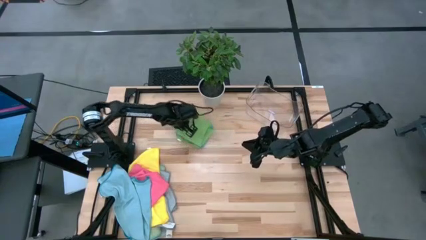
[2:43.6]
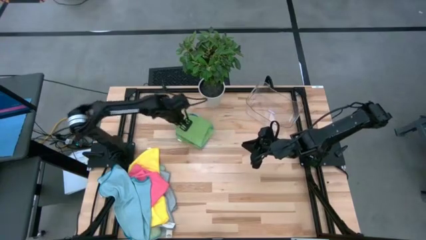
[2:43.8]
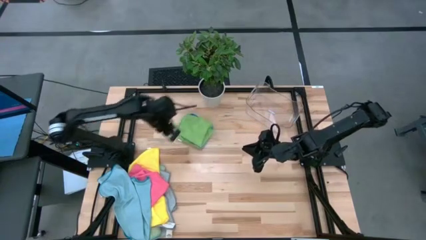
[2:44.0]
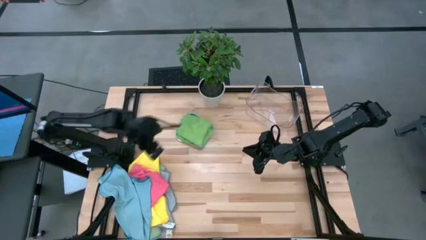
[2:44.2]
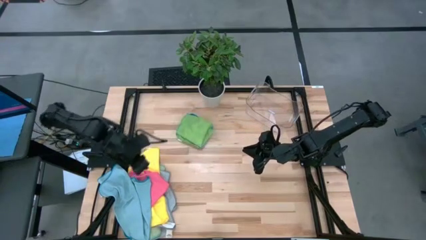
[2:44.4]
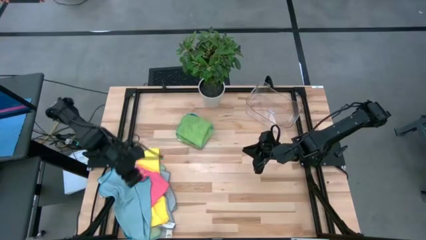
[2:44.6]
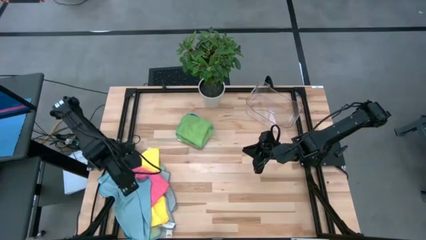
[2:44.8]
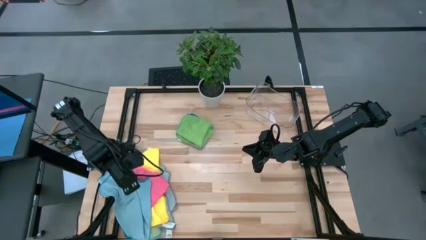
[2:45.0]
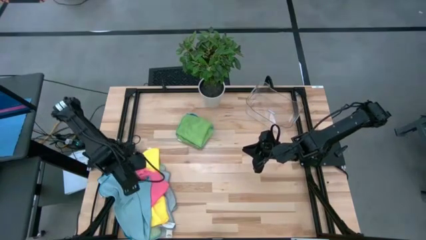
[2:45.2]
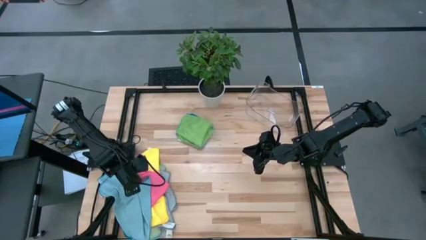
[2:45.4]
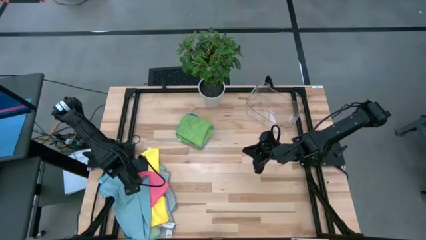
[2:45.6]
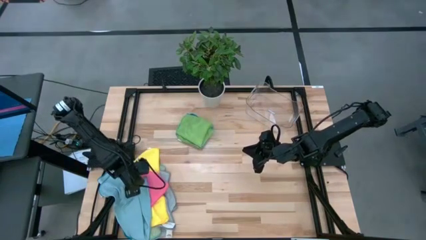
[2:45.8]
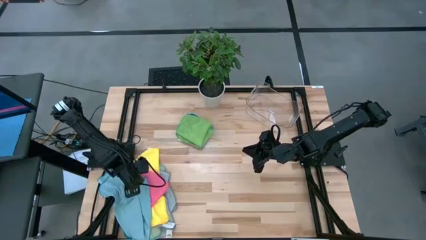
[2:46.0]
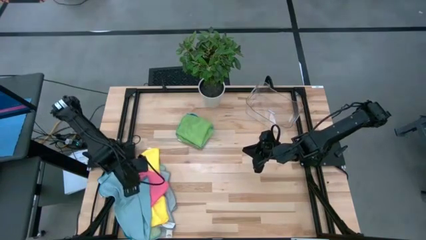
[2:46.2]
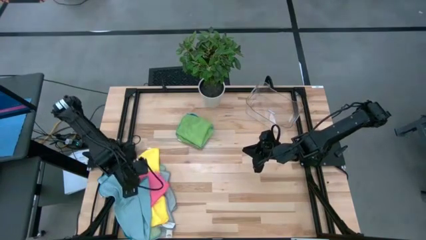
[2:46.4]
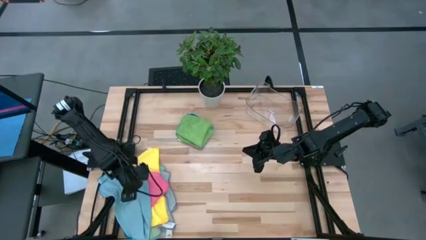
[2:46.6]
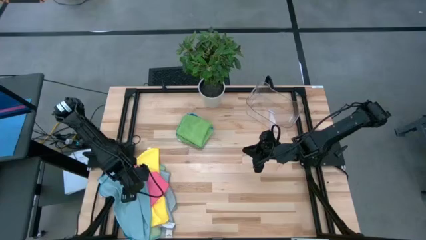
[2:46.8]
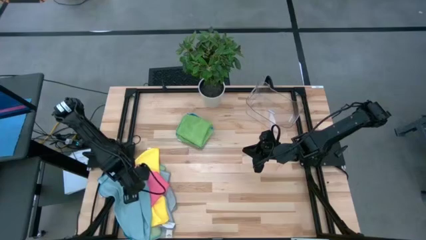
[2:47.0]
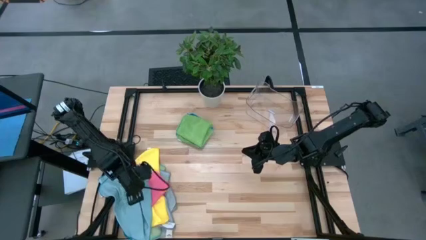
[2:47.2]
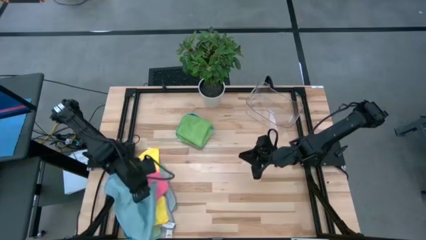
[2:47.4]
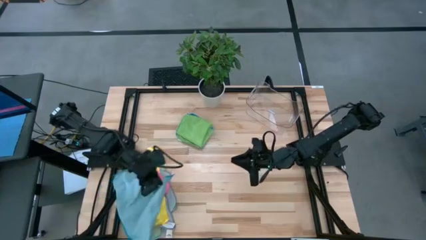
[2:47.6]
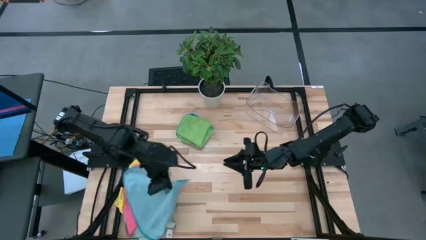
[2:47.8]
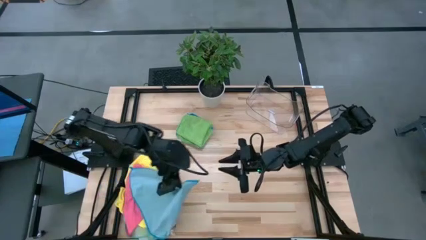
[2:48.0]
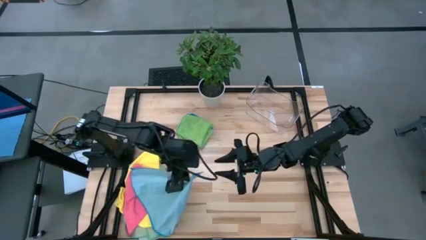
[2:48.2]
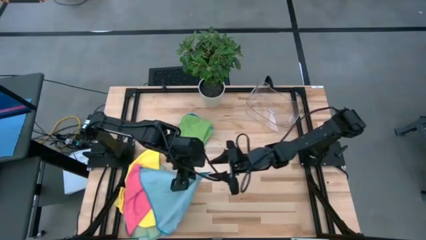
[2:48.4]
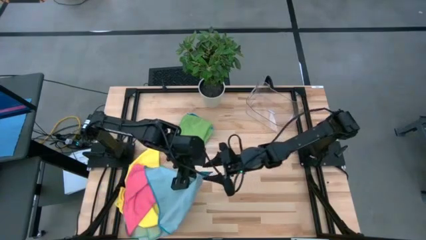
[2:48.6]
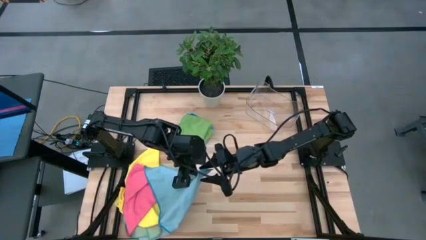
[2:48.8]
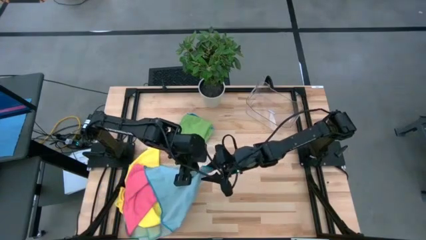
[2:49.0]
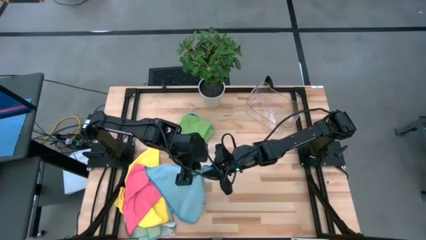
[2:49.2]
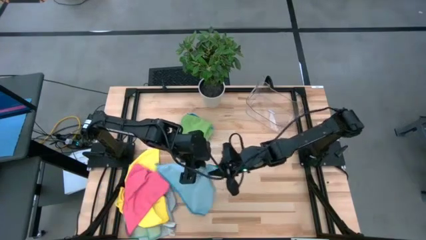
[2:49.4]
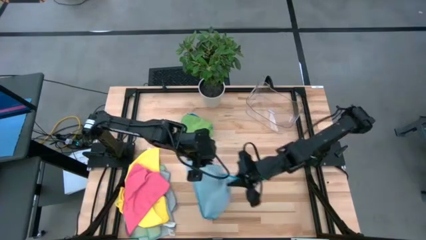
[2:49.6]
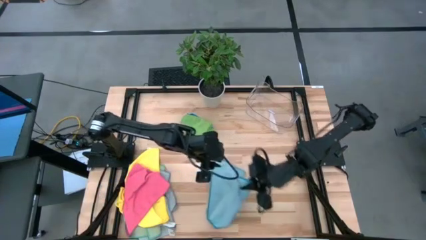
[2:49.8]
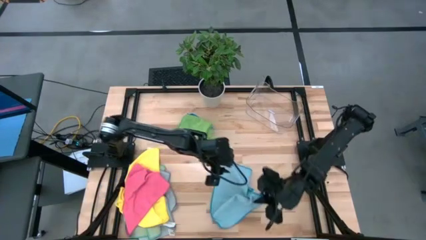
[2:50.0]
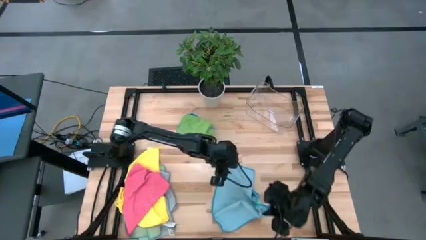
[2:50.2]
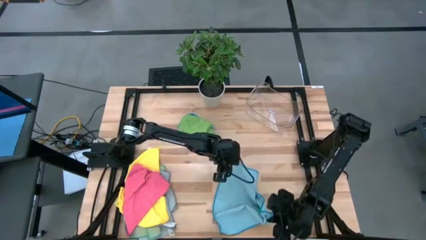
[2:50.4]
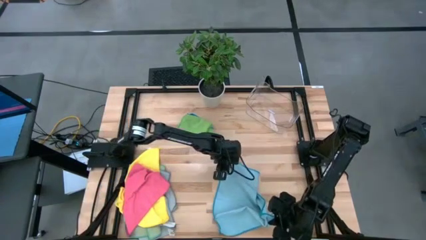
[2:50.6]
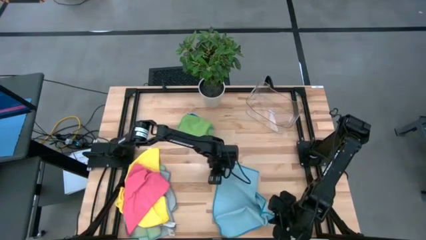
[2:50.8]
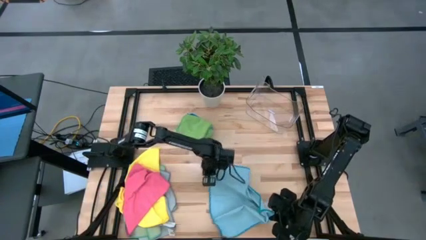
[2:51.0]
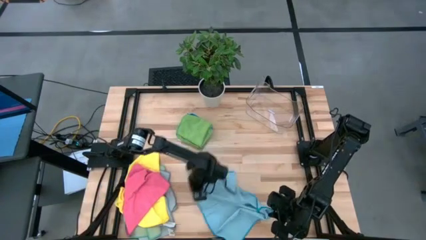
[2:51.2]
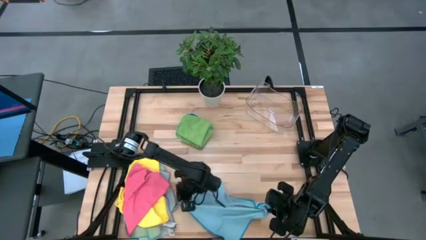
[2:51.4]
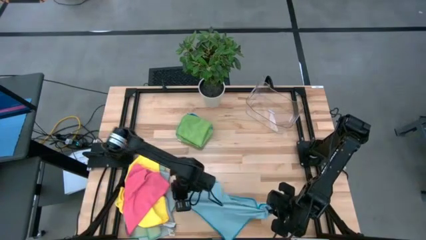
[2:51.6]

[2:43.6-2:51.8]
Task: Fold microfiber towels
Fold the light blue microfiber towel

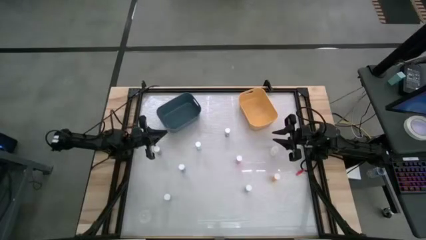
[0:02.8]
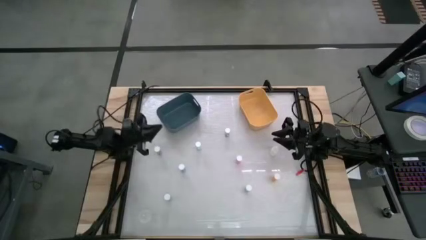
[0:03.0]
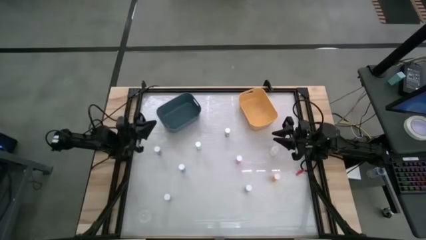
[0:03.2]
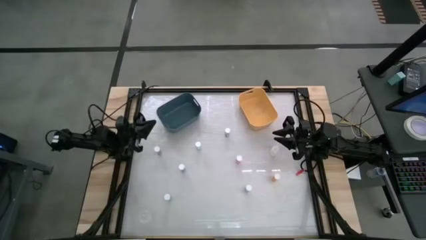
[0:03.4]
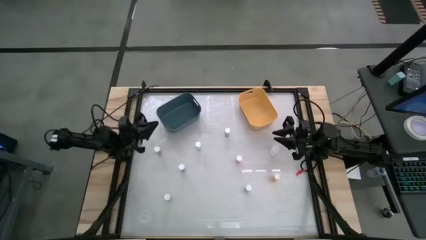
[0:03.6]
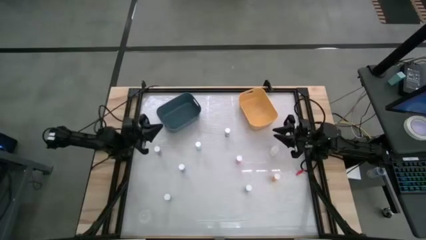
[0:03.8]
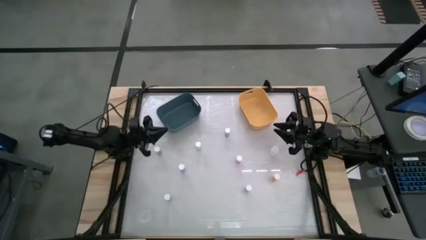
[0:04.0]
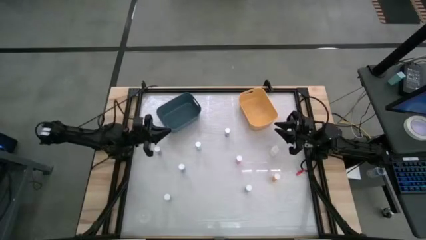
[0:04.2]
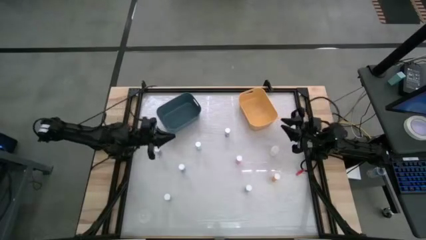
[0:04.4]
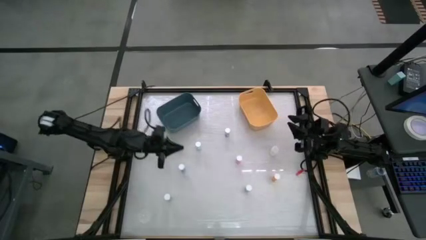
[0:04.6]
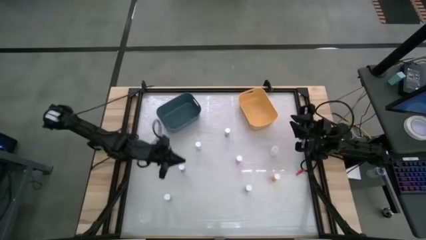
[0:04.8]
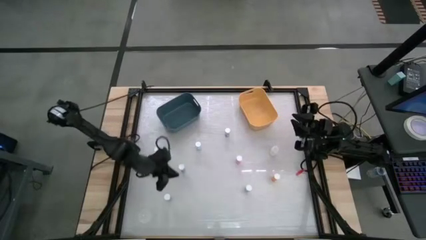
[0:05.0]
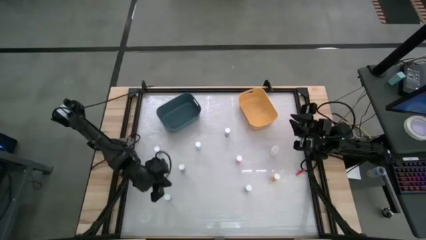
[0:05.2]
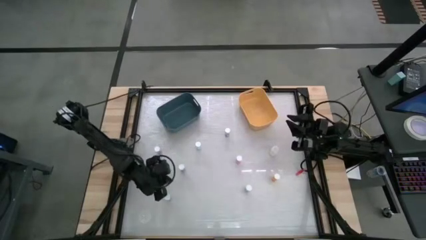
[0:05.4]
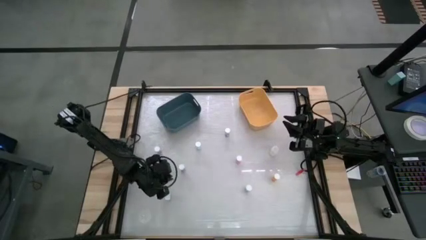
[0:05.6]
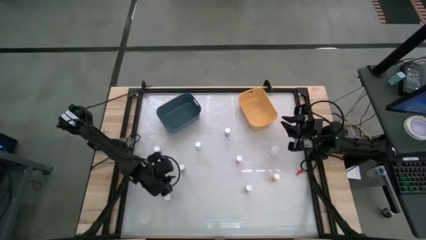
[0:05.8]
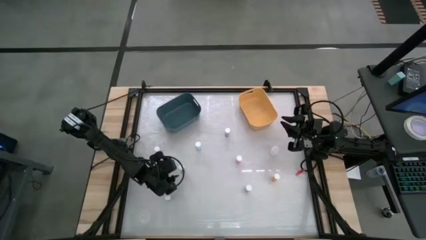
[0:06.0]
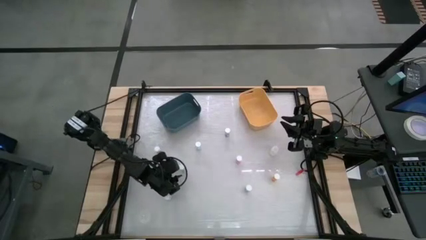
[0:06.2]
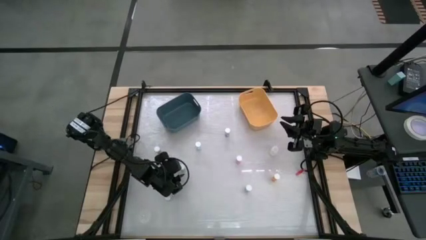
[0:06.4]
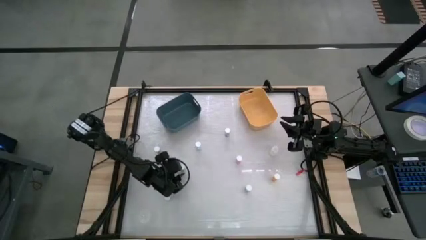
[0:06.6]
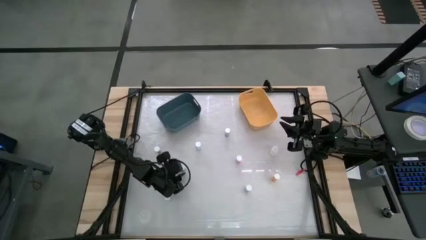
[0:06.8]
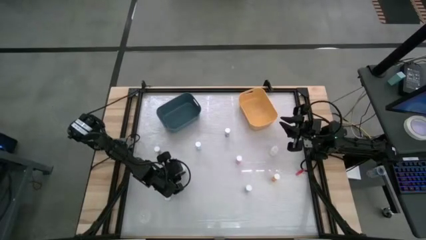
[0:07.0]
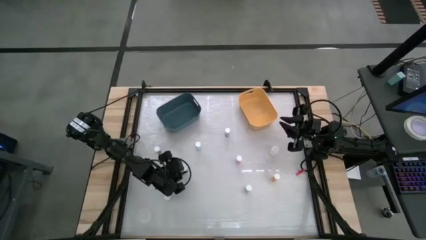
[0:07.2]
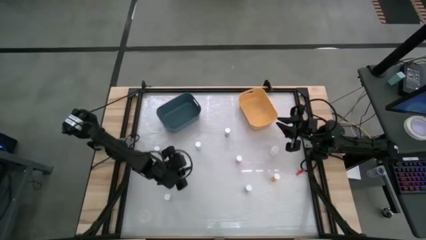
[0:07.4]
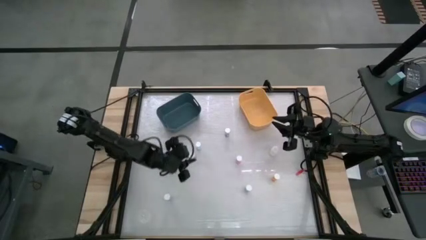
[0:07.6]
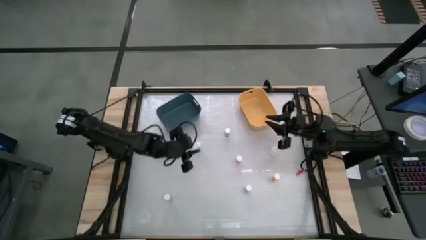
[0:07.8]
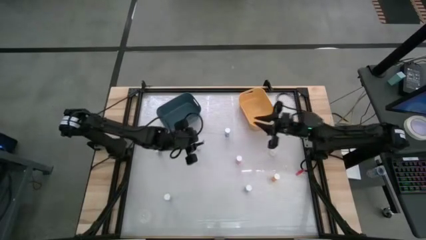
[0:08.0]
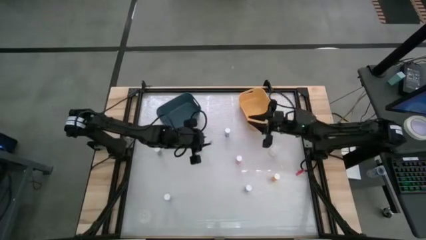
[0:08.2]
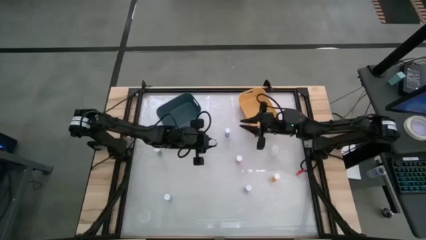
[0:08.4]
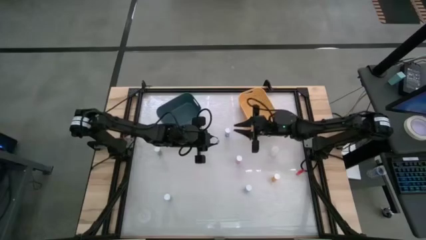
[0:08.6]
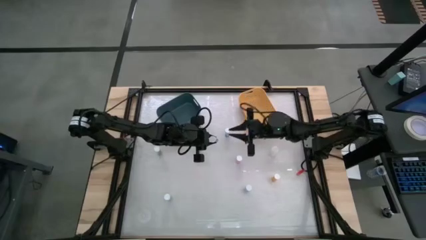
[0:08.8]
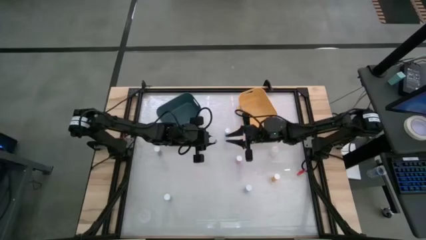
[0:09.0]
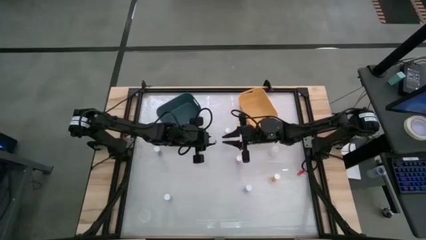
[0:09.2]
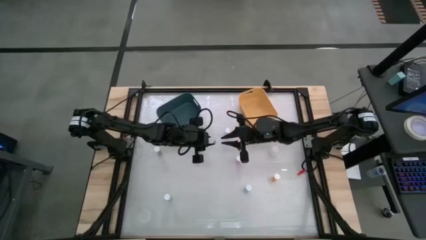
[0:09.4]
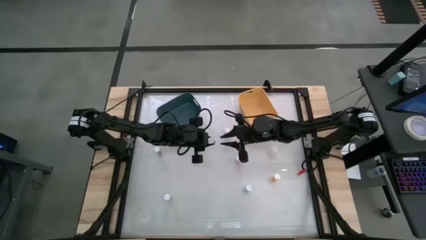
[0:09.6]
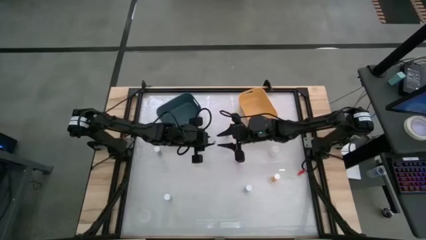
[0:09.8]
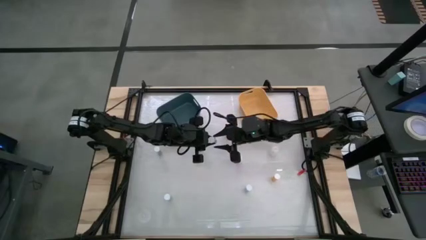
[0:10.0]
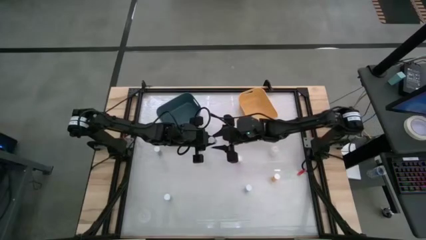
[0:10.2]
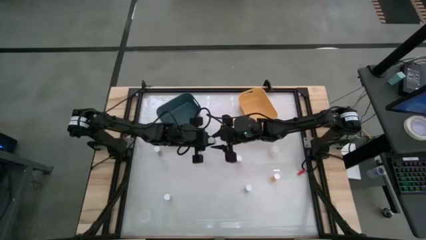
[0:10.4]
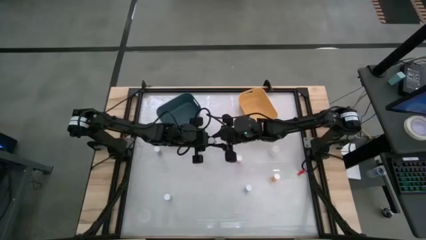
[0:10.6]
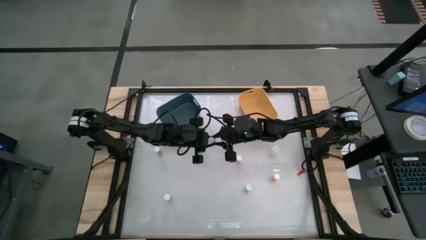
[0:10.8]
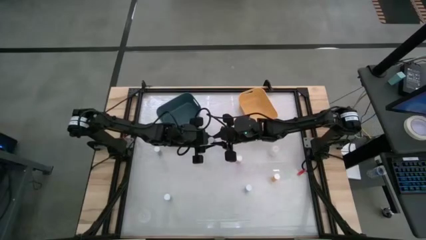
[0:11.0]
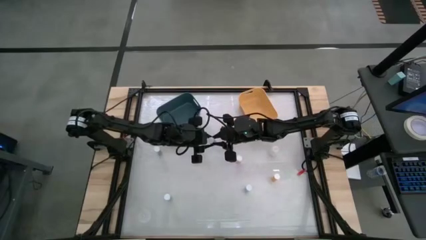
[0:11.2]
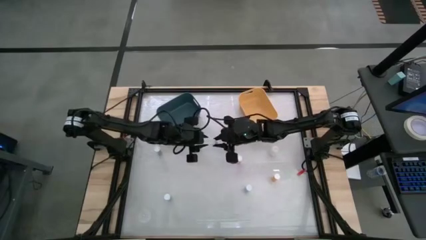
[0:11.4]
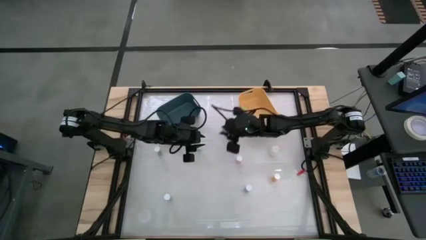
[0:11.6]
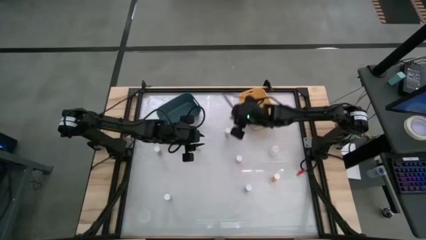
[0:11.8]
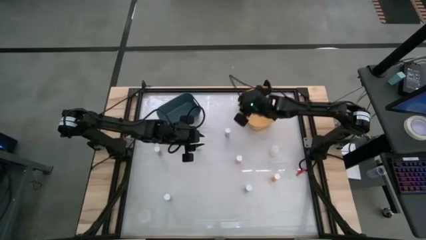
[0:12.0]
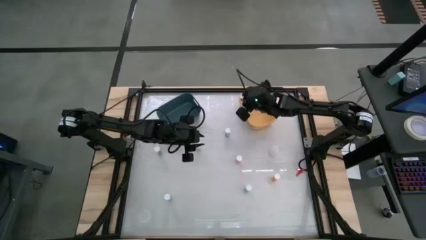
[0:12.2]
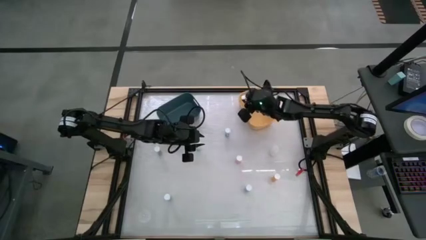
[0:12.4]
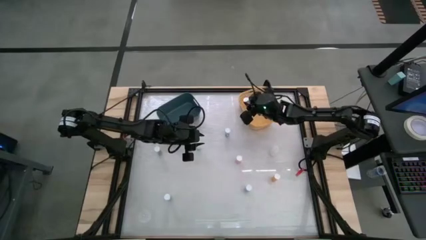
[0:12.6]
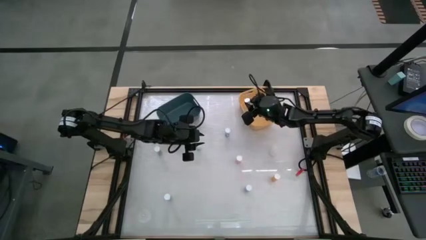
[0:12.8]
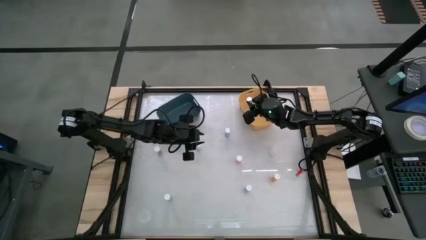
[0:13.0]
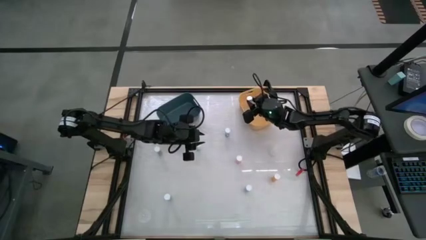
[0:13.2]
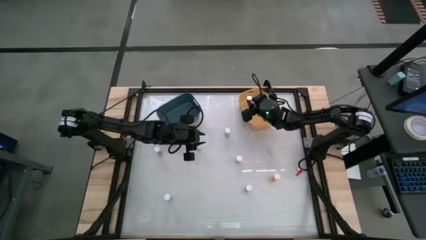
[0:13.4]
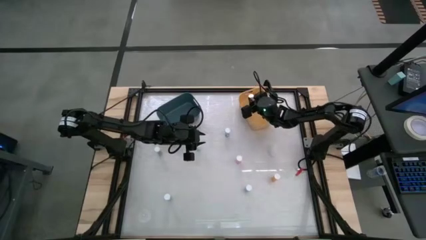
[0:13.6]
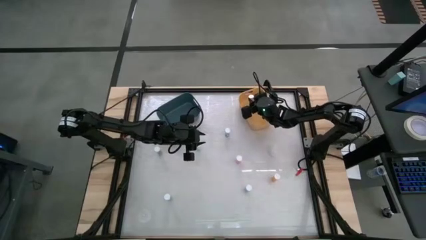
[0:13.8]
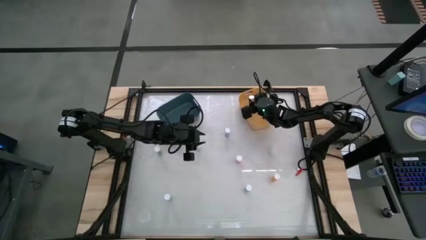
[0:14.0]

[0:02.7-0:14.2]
Task: Pick and place medicine bottles into bin by pill shape (circle, oval)
Put the blue capsule bottle into the yellow bin
